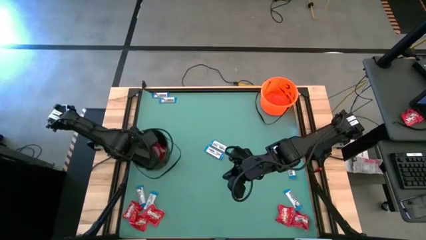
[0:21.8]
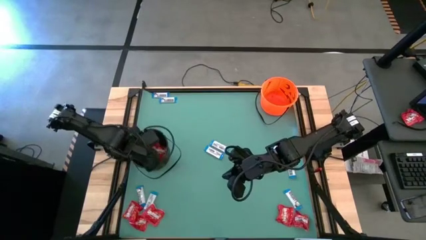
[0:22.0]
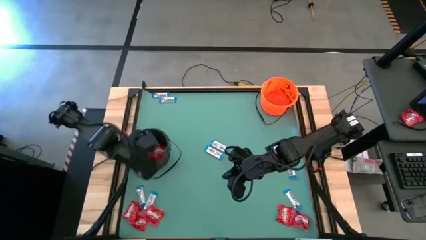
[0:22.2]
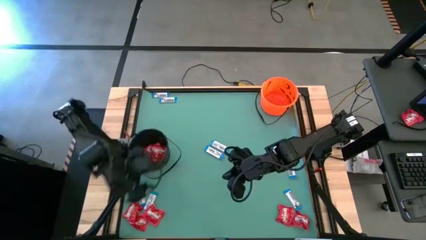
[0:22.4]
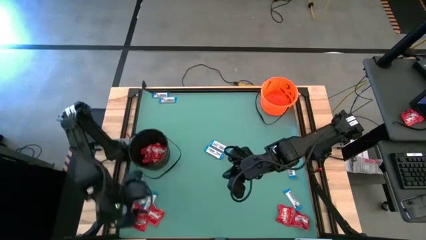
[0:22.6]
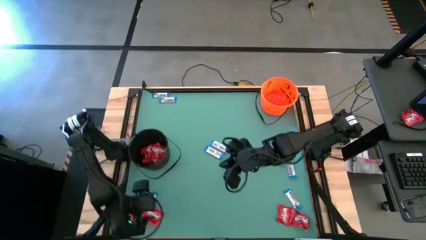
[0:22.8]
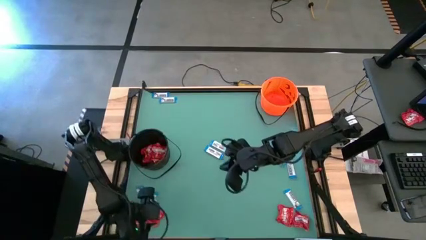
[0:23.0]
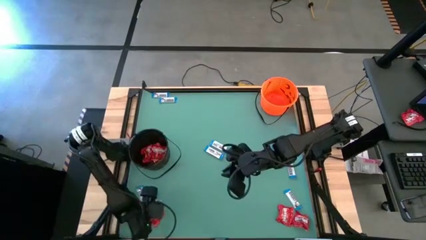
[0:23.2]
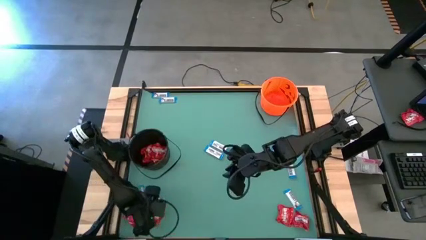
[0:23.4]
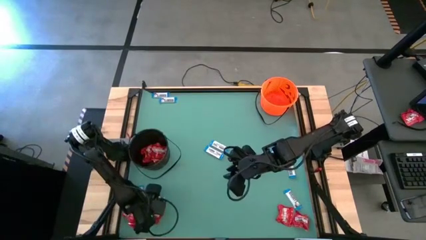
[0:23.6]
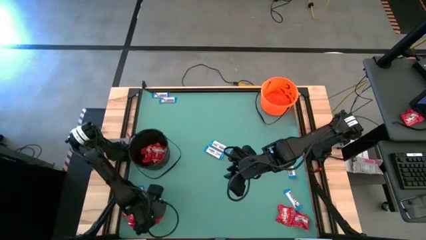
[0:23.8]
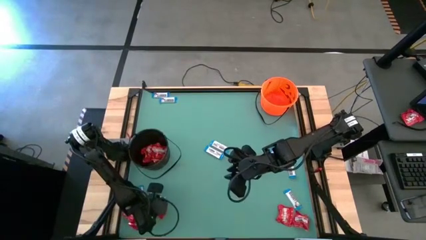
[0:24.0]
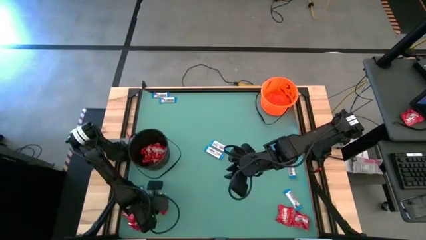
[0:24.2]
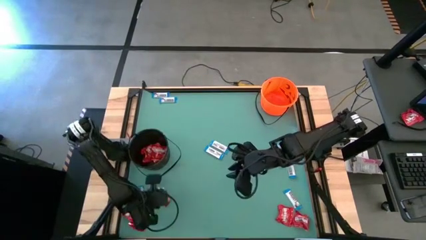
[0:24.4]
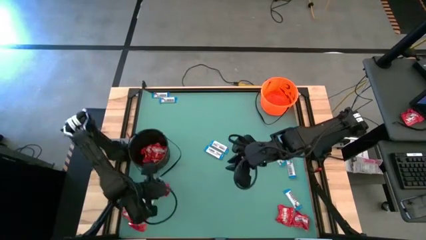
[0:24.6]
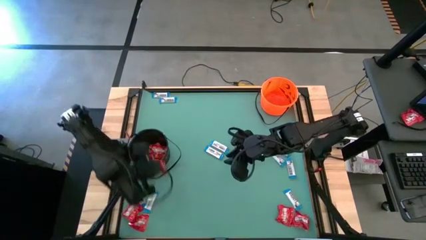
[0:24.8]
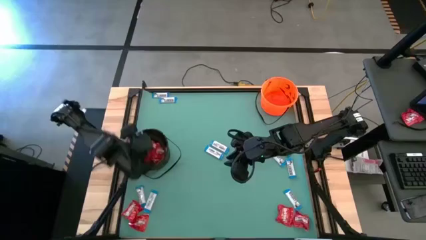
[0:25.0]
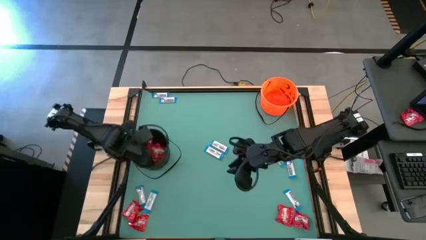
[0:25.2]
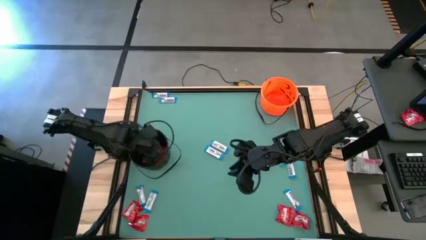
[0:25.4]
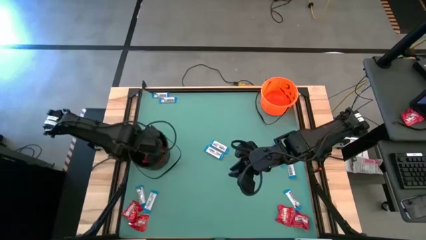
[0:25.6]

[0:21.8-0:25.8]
Task: Sort candy by brand, put in halloween buckets
Put the red candy into the black bucket

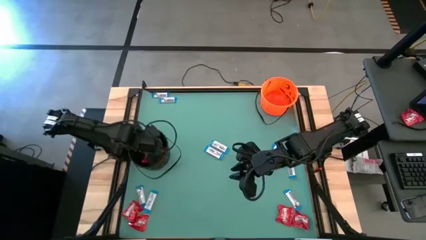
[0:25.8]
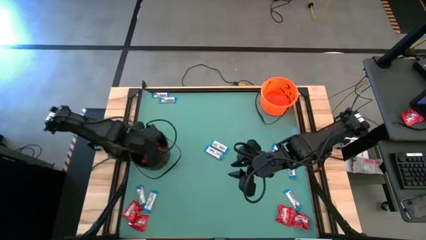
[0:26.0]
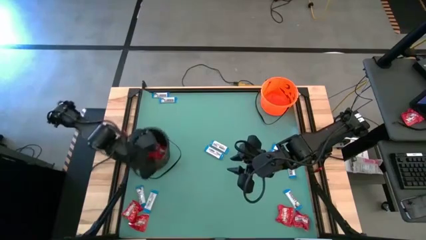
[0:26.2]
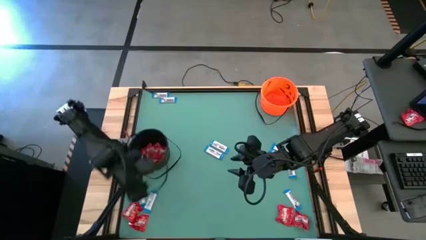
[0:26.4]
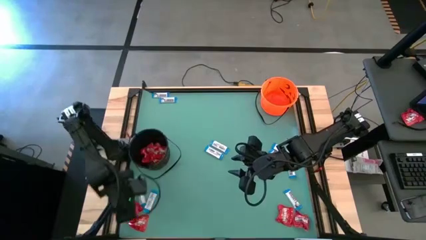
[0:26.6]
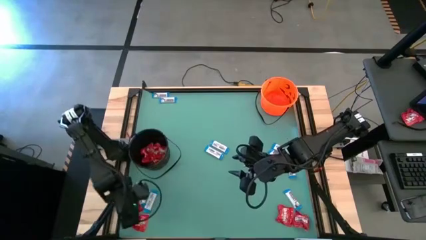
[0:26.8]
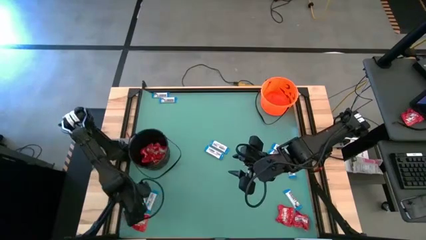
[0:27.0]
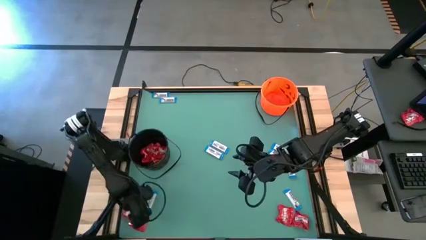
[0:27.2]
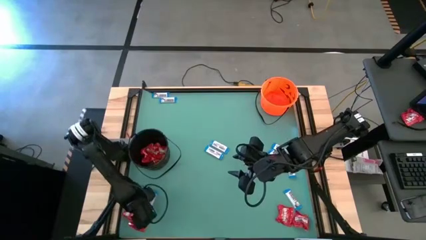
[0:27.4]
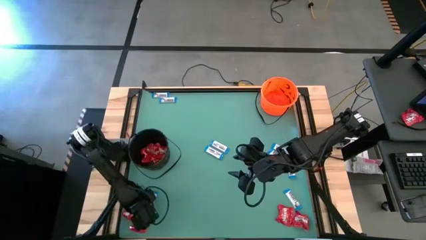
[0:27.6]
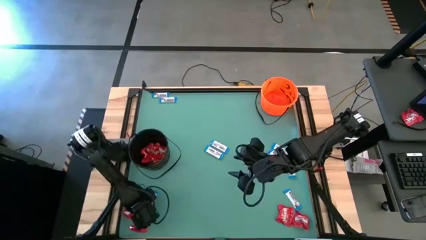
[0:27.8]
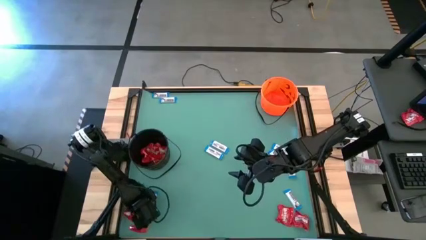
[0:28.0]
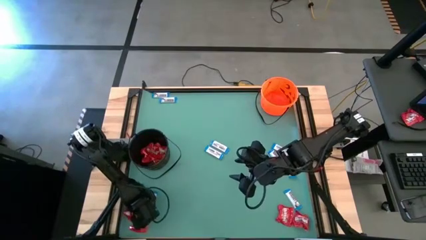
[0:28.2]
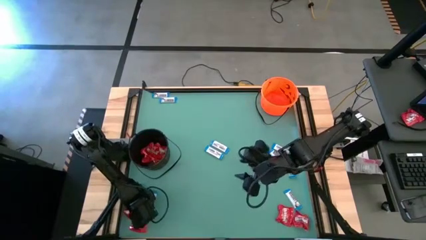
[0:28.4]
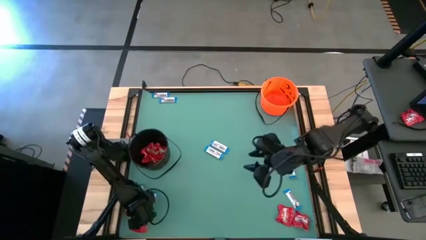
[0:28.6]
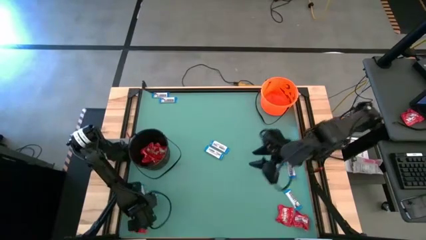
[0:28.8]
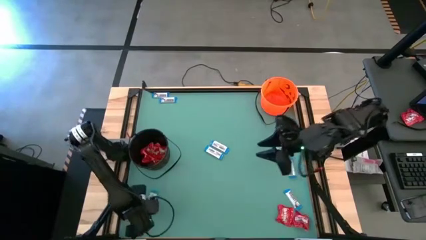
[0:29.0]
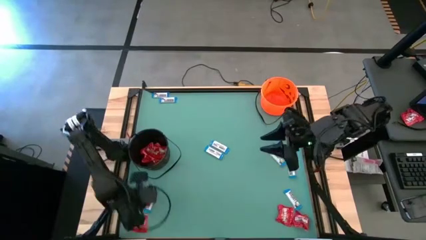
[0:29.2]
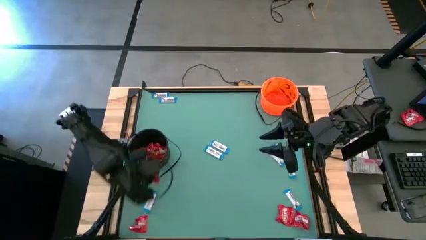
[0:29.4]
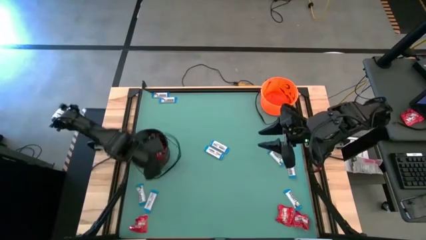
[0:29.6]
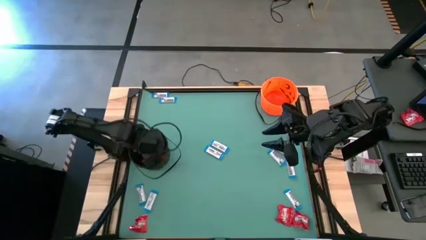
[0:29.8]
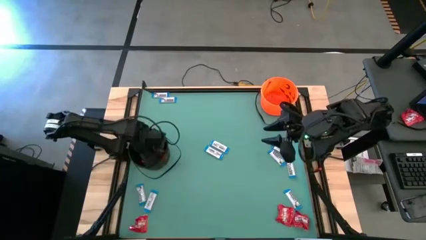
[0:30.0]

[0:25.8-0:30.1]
Put the red candy into the black bucket

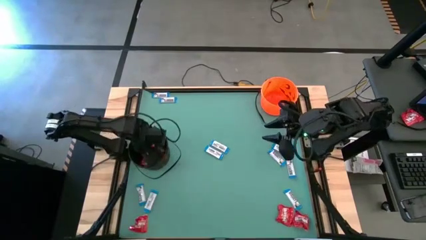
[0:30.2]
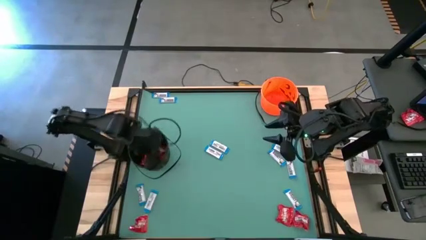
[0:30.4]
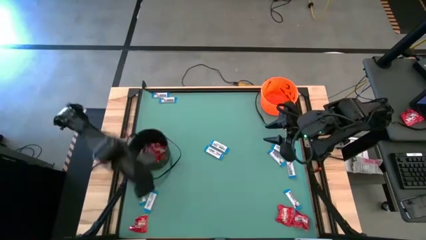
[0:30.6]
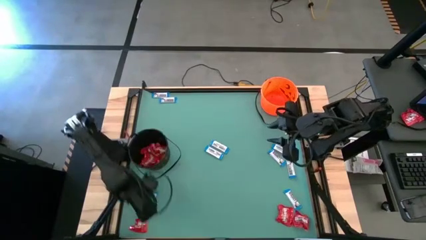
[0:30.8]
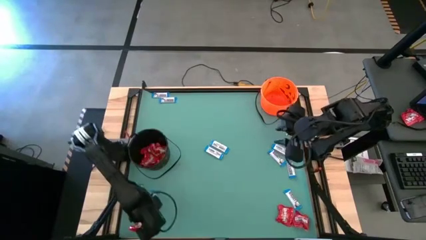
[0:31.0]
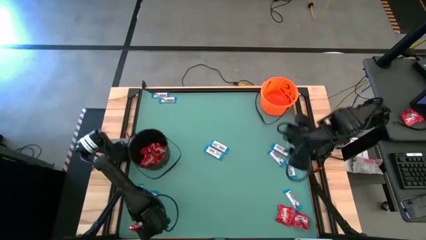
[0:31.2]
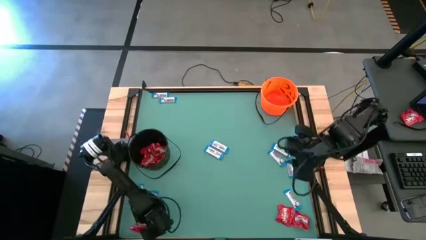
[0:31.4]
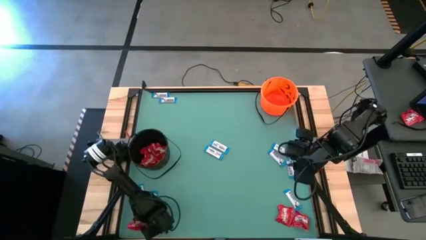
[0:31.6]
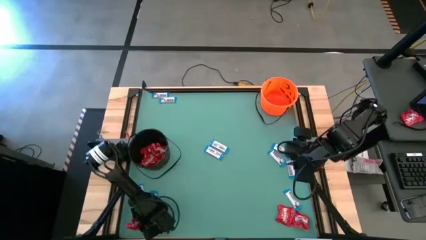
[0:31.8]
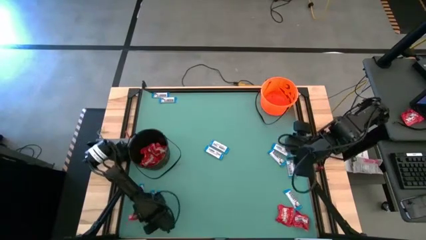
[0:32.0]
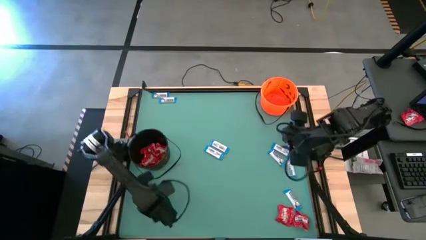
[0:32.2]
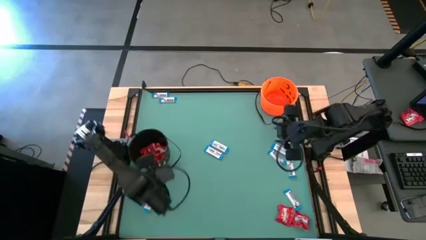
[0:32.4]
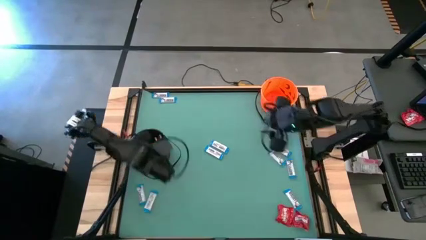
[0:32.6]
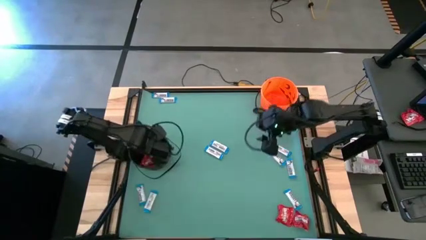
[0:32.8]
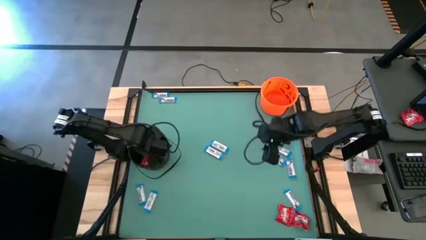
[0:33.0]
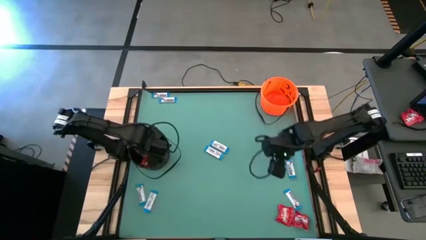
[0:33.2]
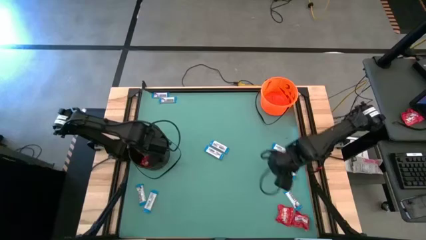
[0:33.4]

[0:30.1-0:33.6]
Put the red candy into the black bucket

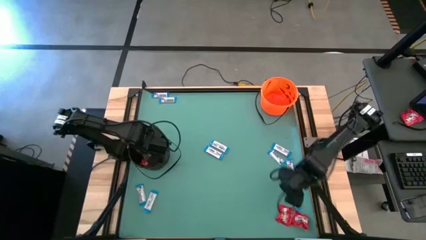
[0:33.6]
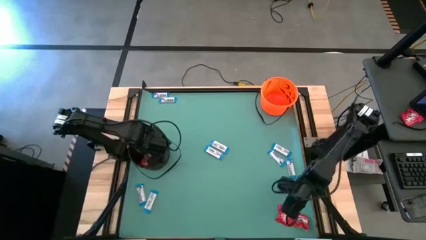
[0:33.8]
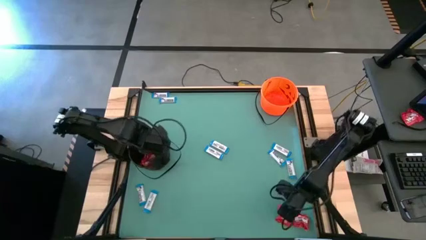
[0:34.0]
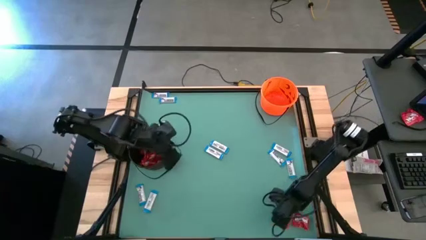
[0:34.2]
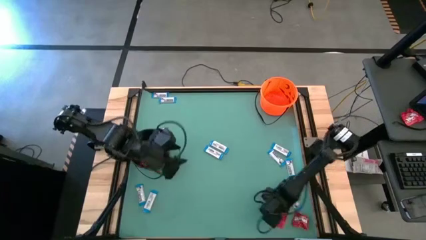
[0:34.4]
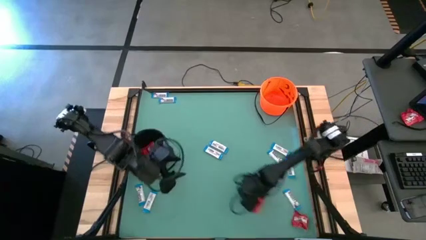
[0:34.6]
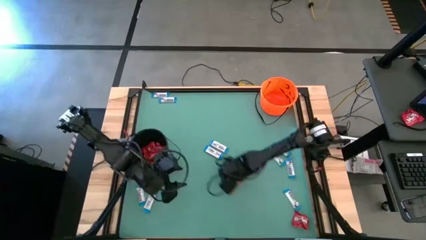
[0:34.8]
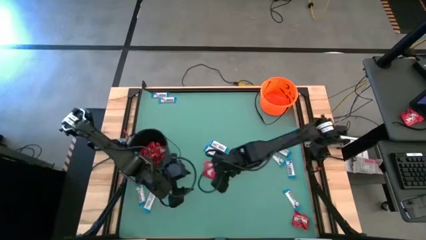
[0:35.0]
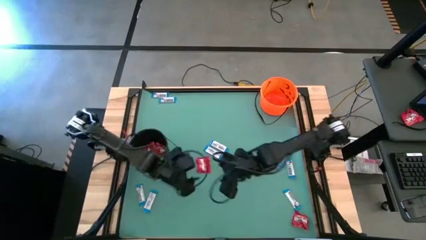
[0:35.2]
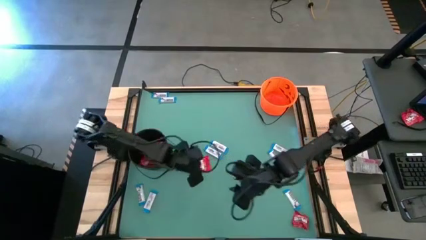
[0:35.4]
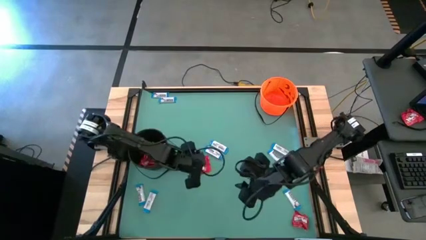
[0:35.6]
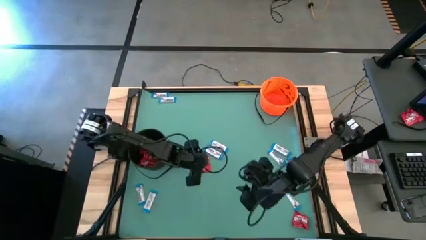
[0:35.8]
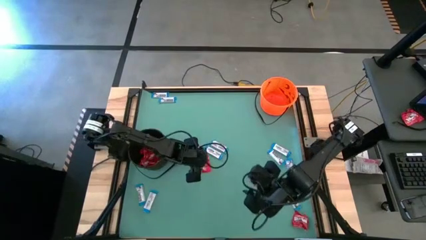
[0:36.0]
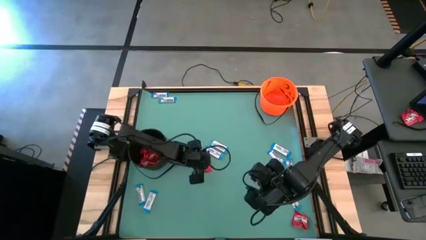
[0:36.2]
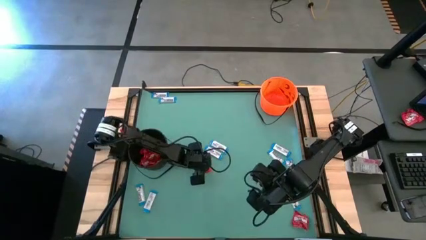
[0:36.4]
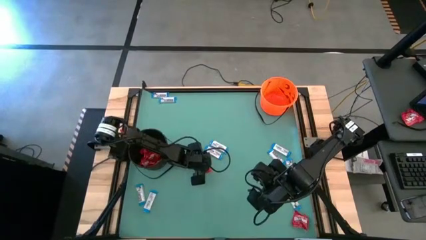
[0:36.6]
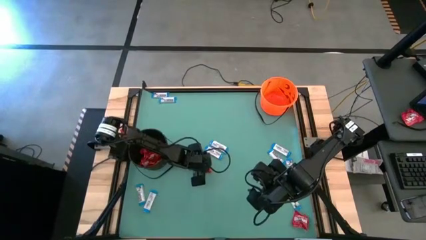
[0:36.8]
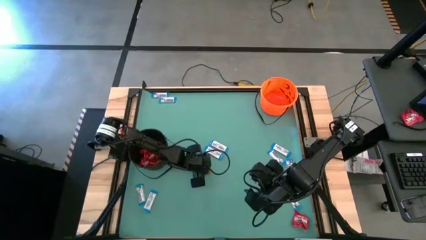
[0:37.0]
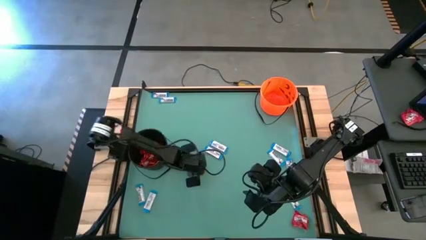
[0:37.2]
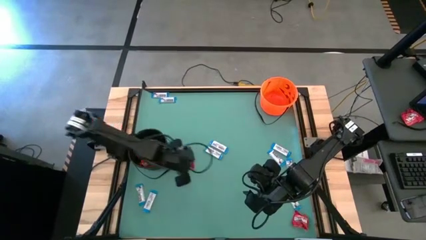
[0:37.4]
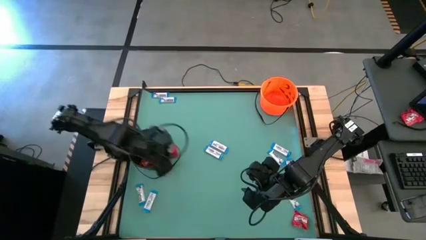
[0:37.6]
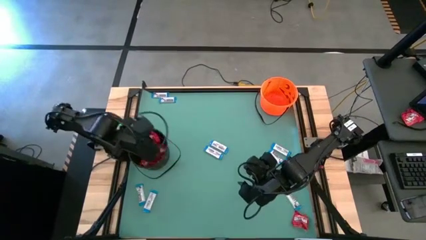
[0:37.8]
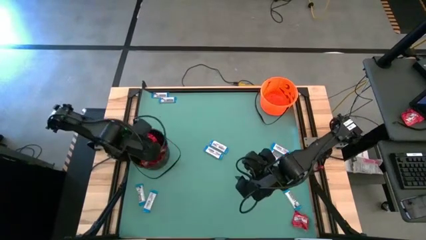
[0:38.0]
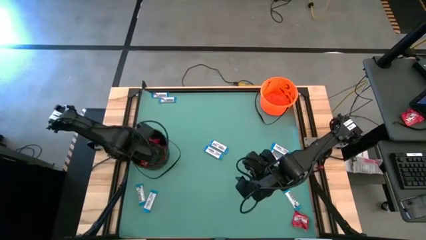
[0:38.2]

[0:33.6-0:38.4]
Put the red candy into the black bucket

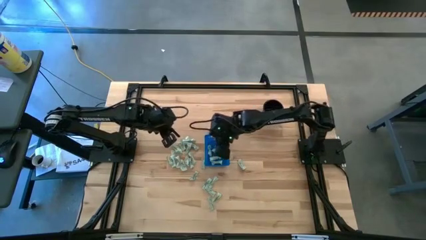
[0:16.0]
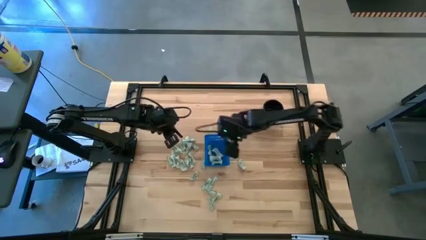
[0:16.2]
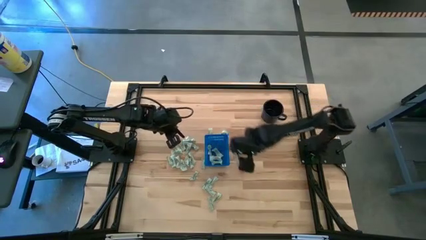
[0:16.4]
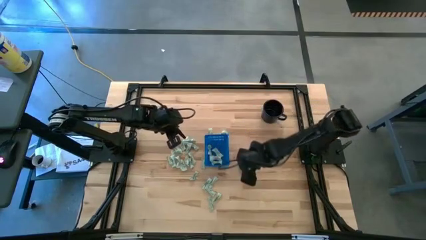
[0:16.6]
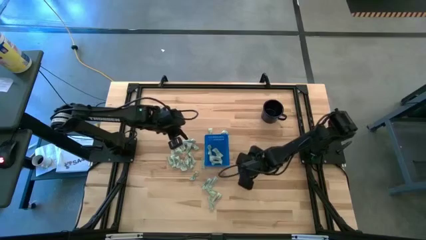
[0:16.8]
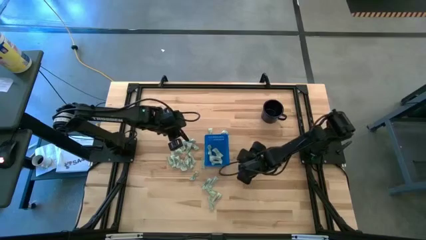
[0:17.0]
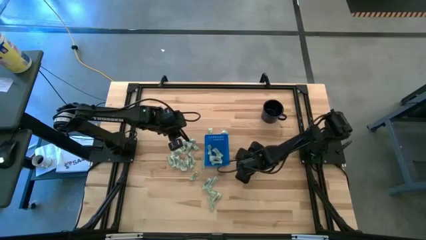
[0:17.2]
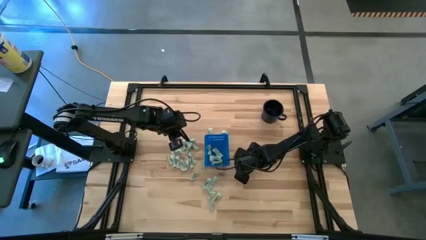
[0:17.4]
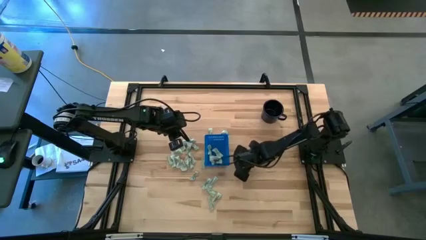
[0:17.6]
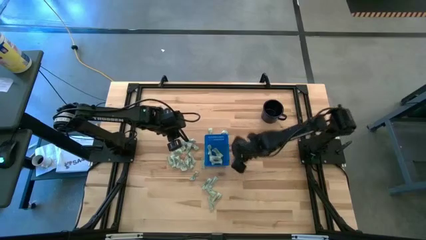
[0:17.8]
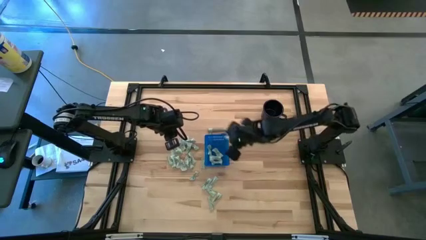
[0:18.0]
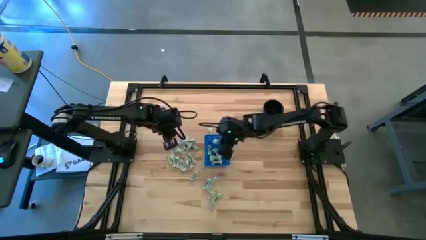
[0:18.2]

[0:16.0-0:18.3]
Task: Pick and place Stevia / Truvia into bins
Put the stevia packet into the basket
